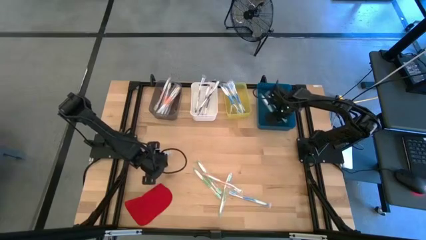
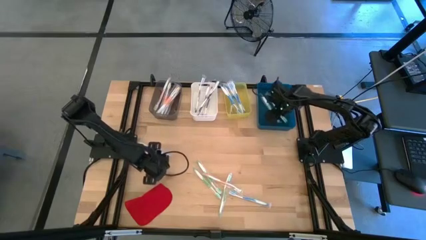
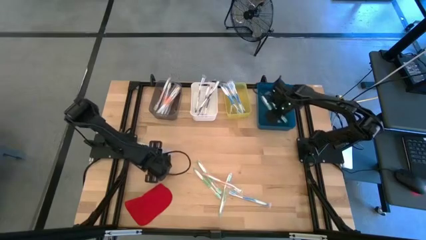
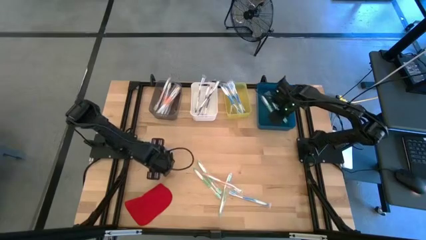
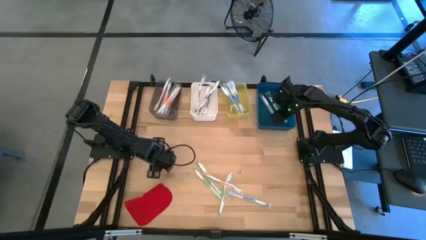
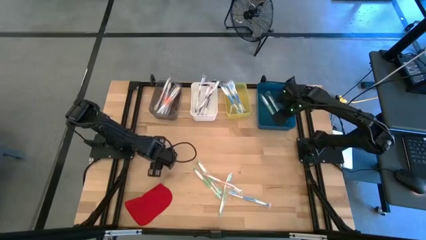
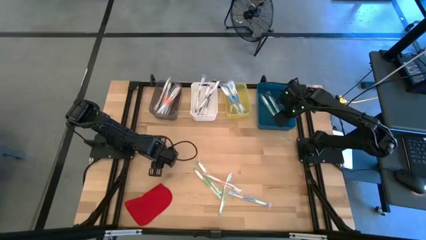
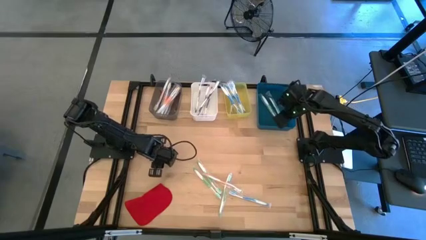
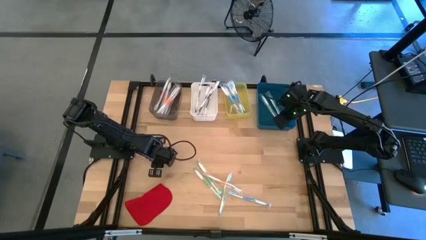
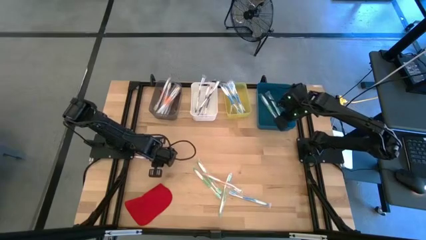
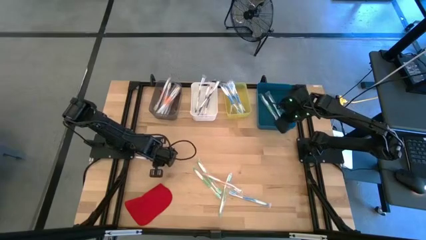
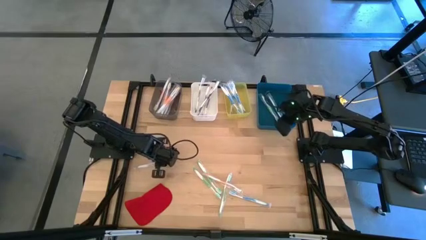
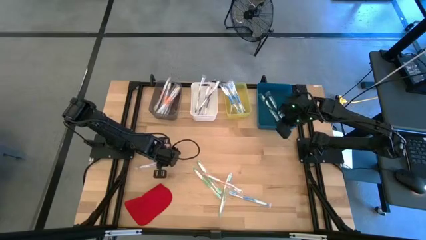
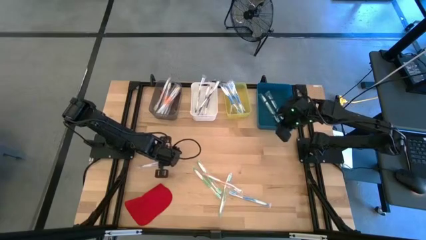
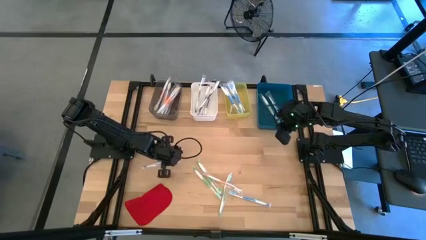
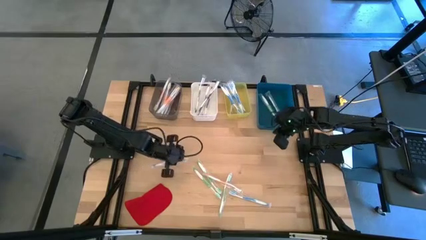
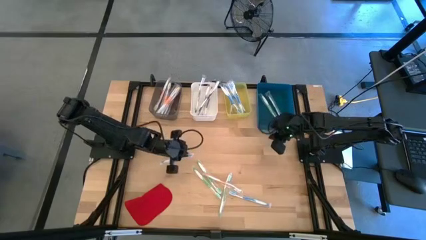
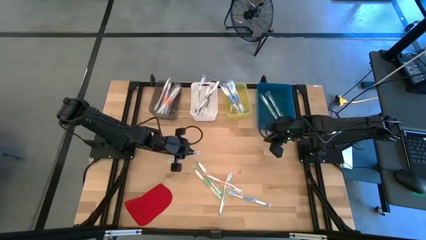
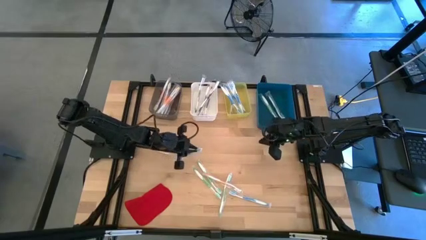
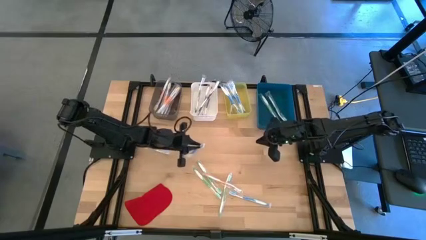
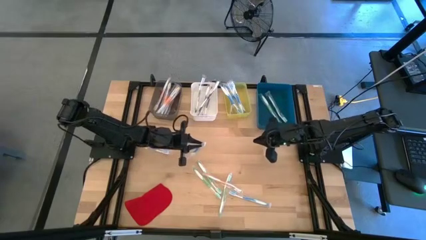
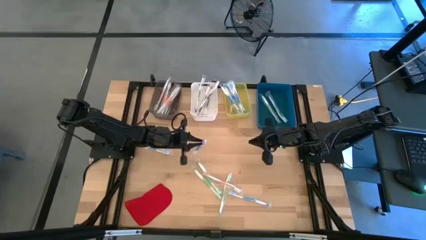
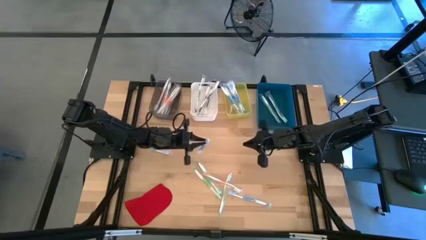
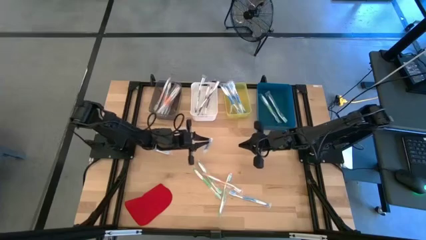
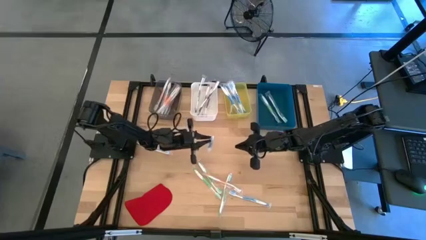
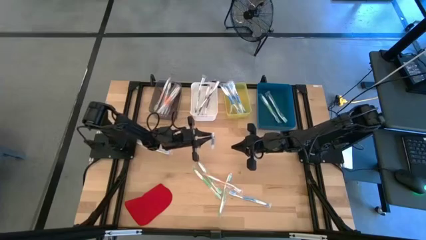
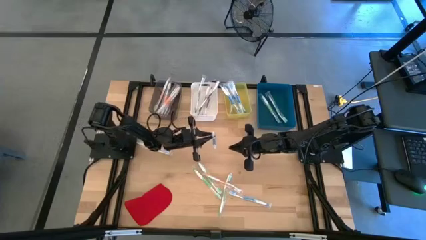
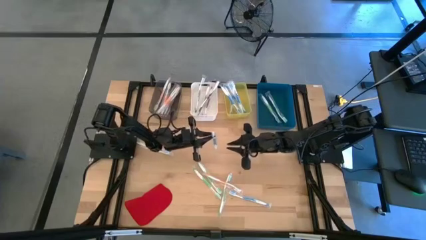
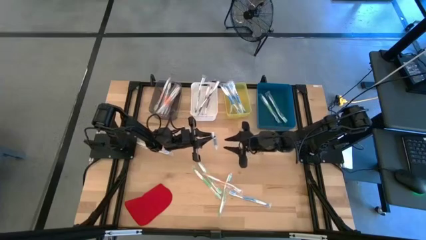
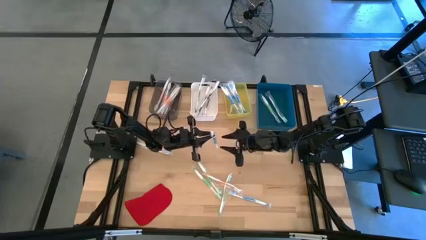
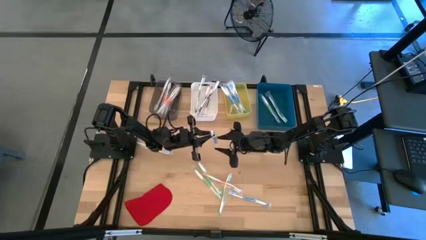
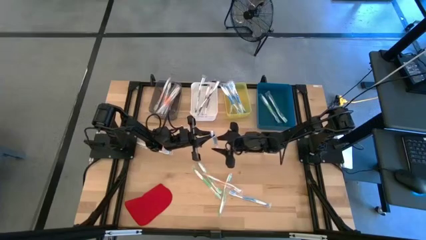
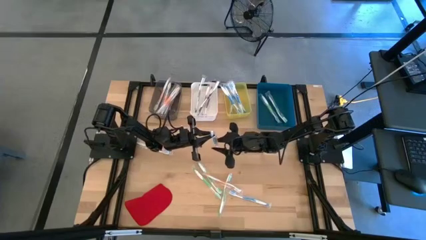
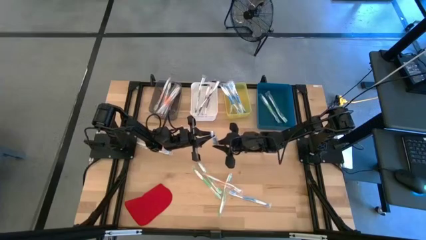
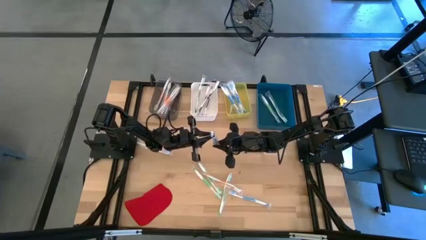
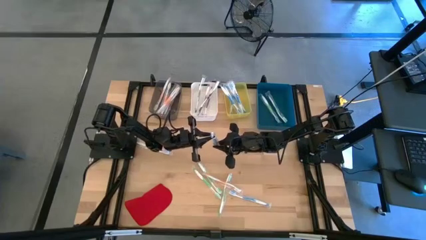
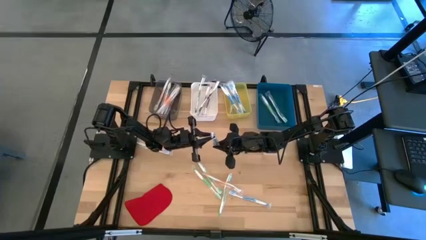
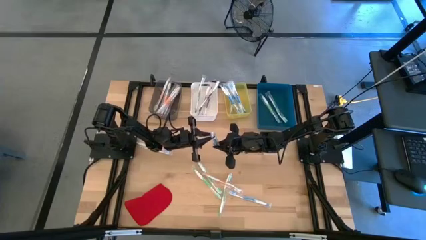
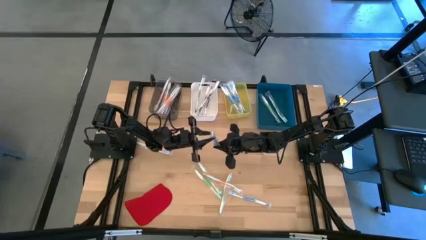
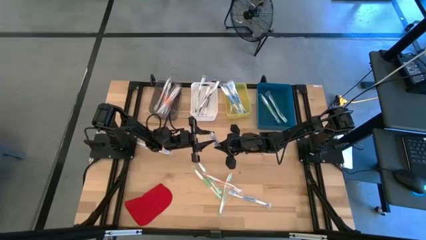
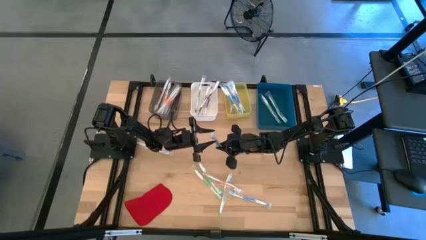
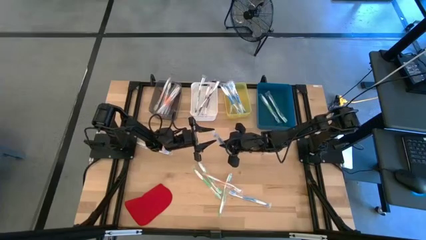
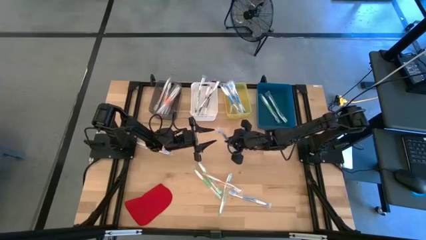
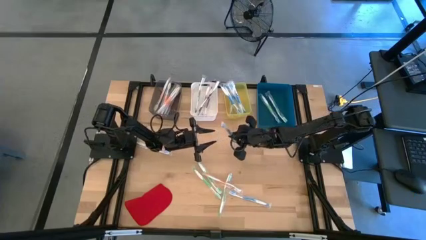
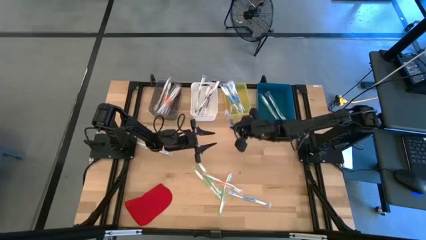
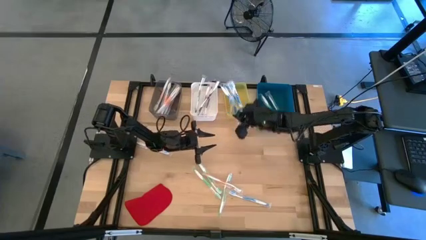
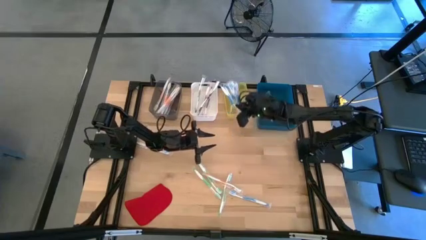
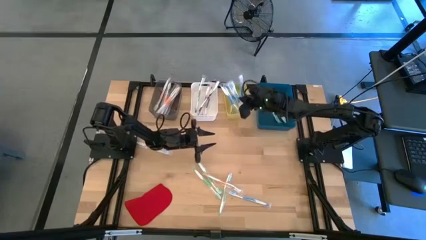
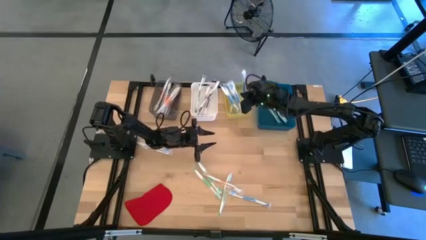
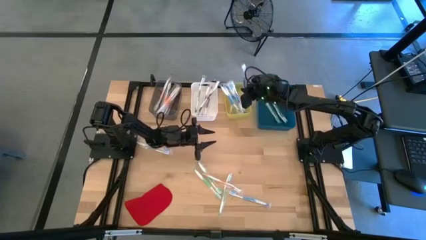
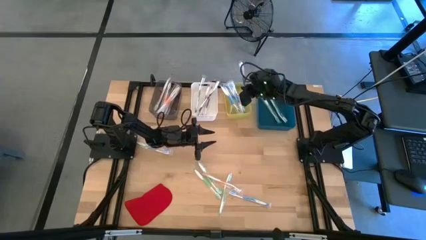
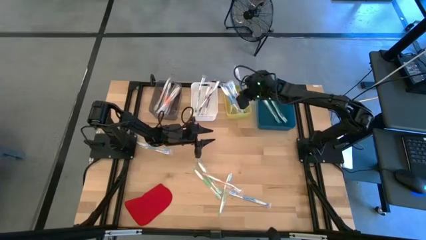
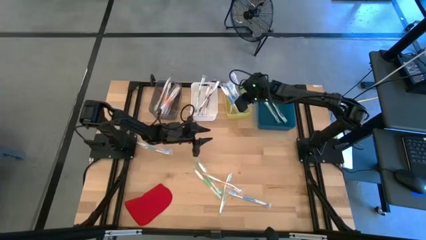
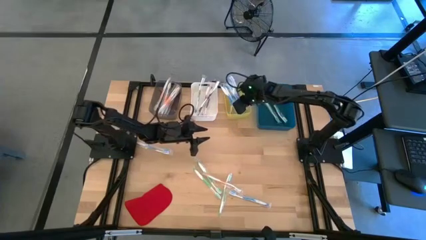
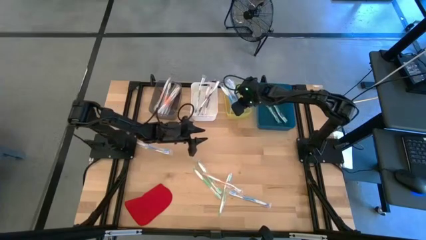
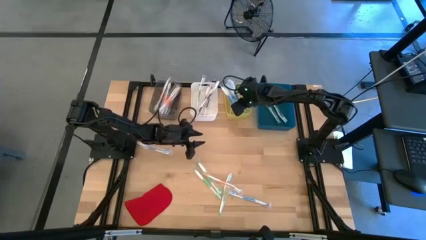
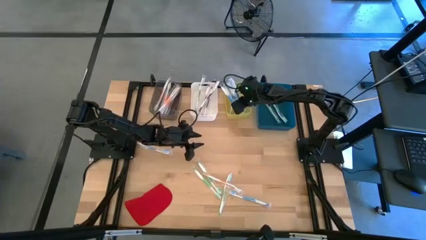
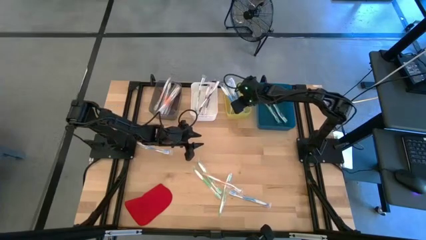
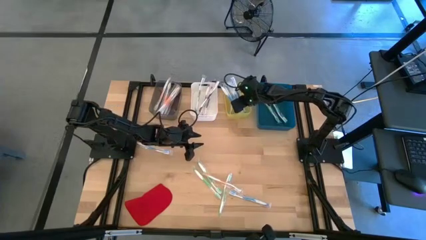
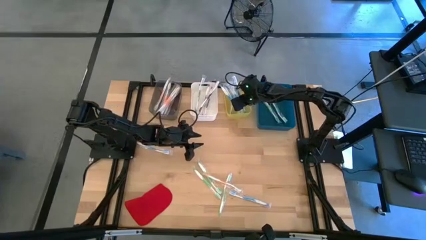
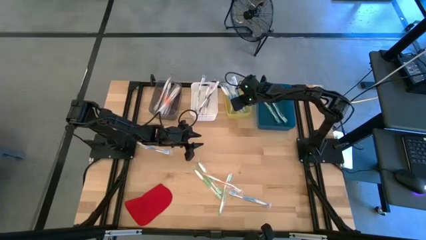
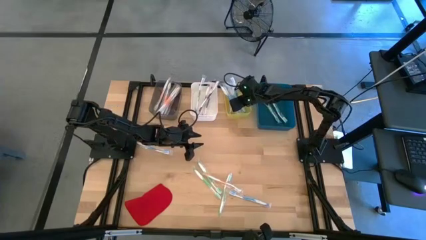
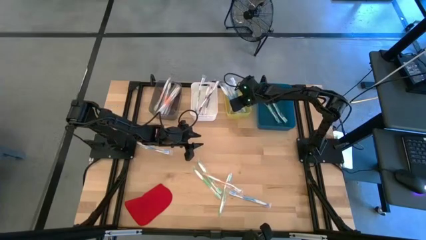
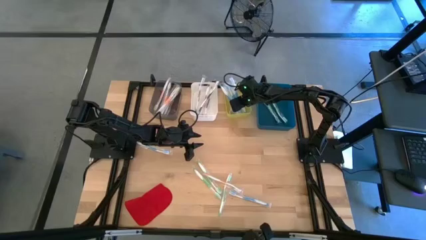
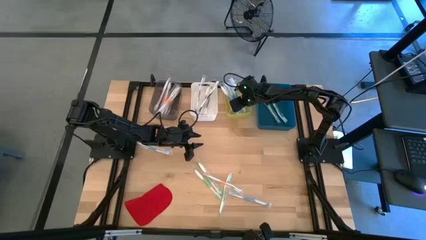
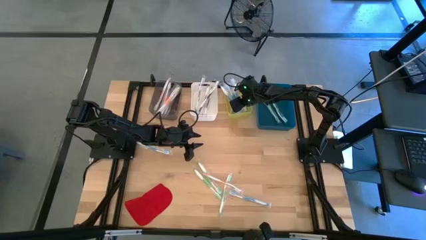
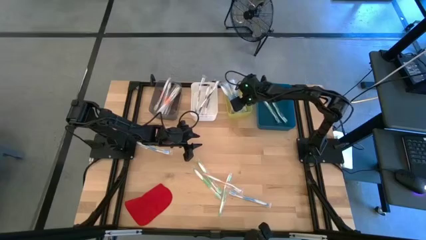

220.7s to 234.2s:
Task: Pick & Place Toothbrushes
Put the blue toothbrush into the yellow bin

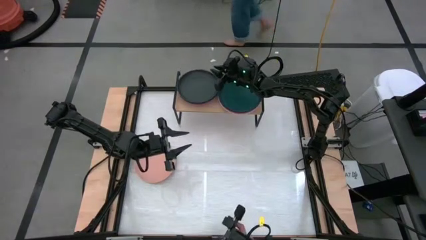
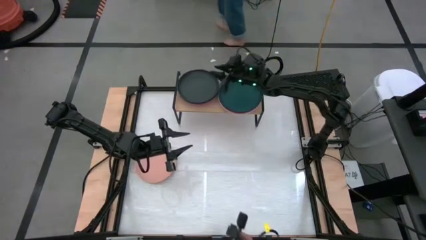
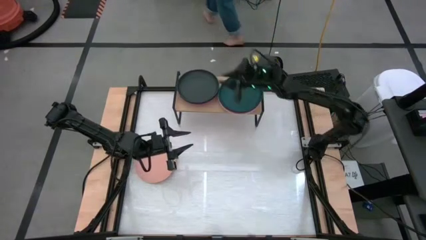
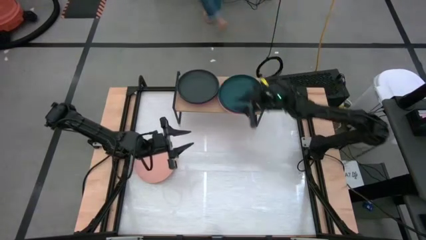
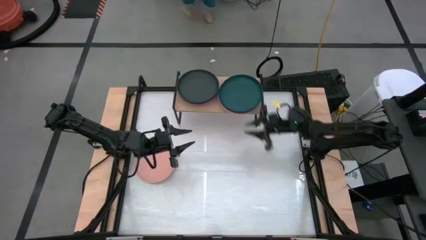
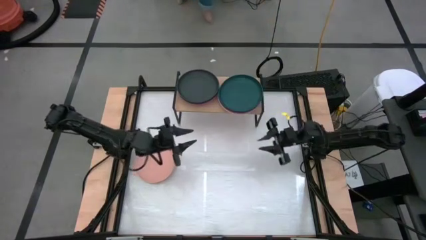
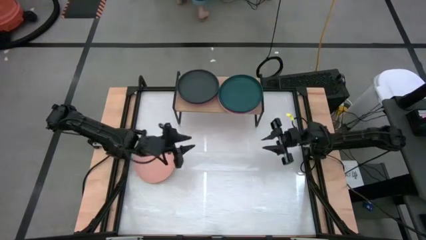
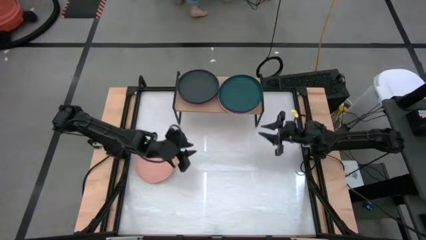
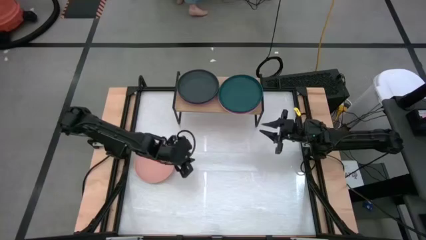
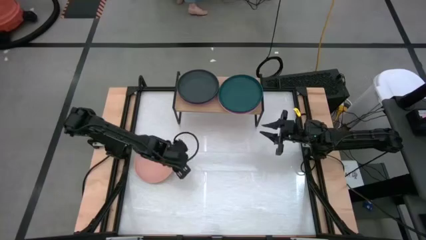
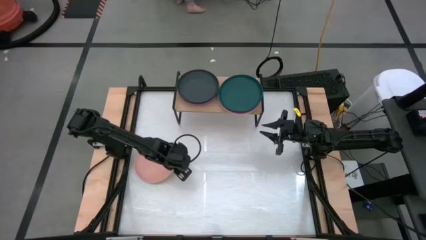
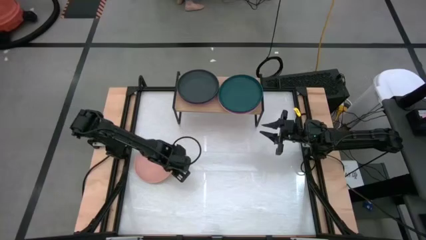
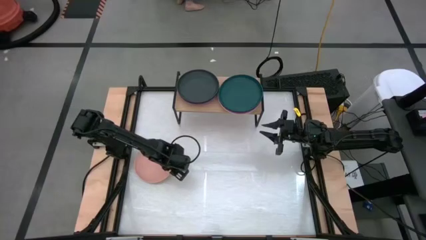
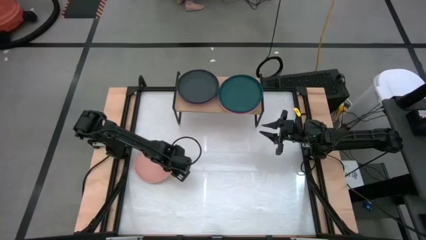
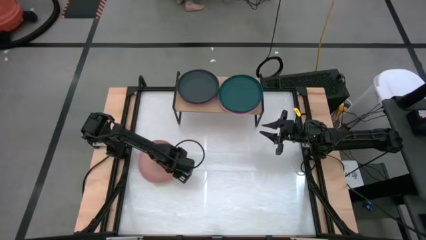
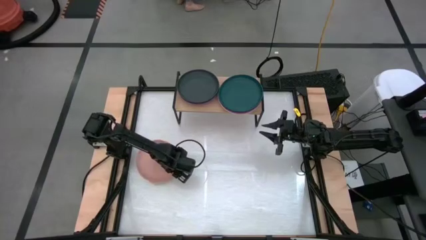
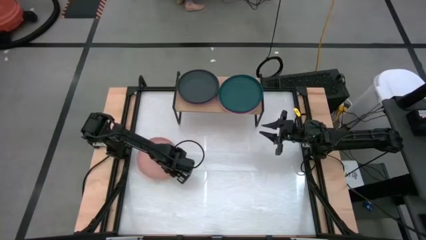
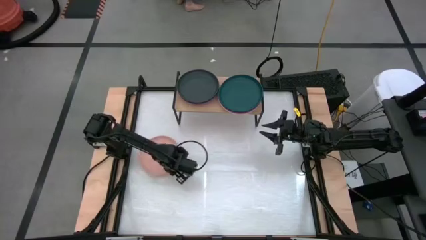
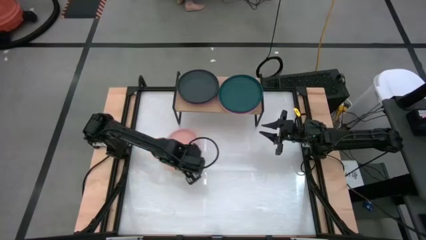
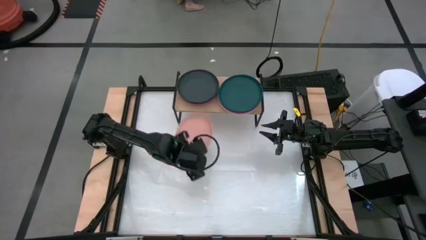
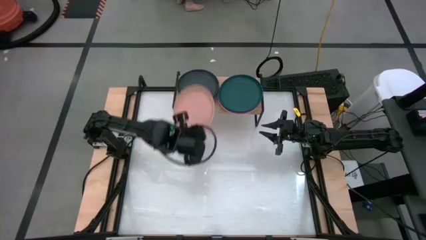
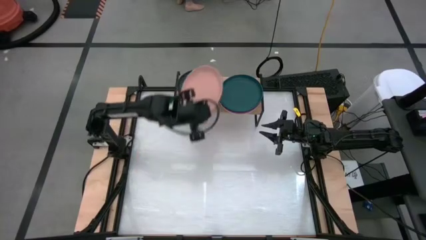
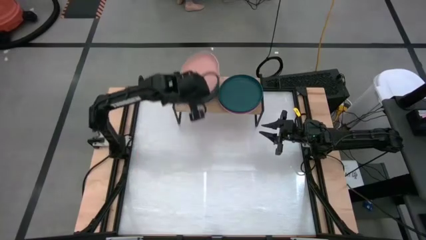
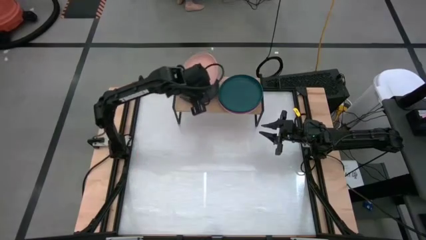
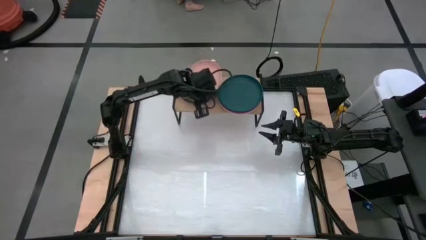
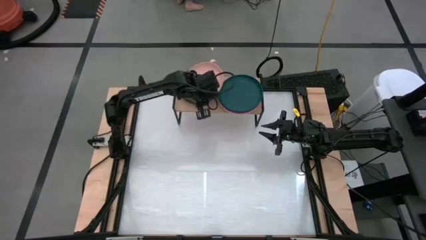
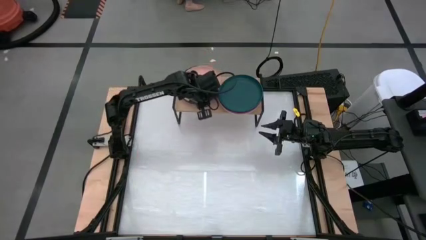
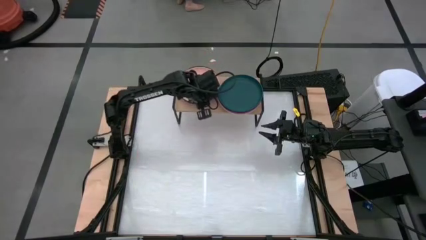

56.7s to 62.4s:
Task: Place and stack plates onto a shelf
Stack the light orange plate into the black plate on the shelf
